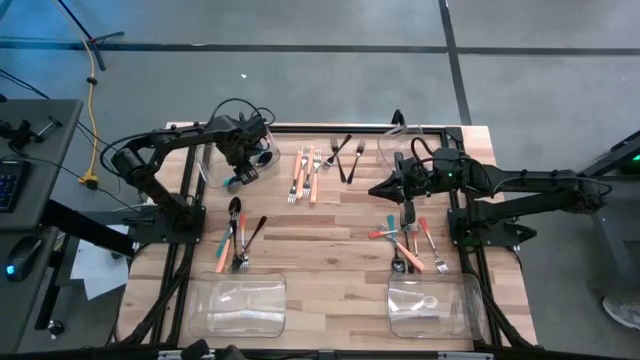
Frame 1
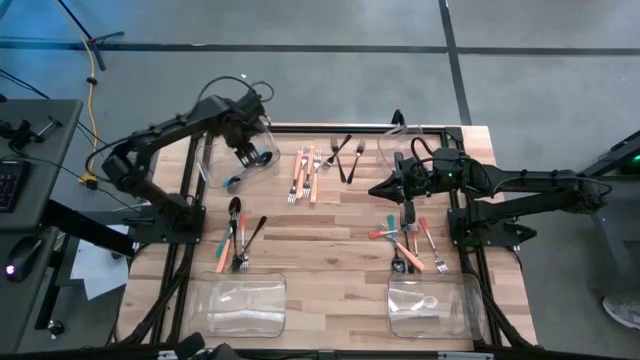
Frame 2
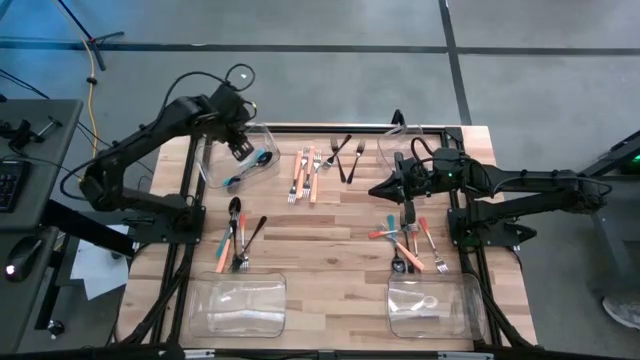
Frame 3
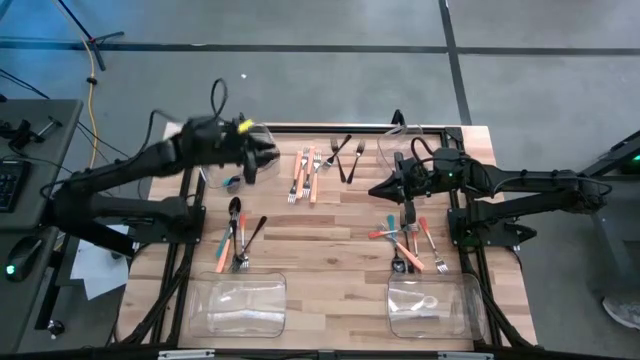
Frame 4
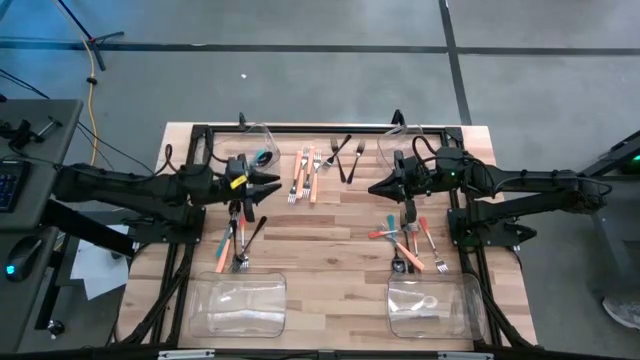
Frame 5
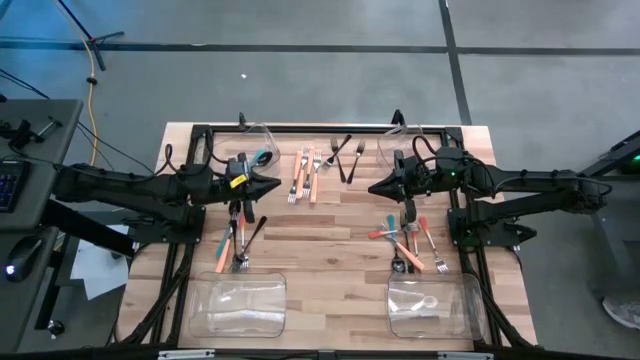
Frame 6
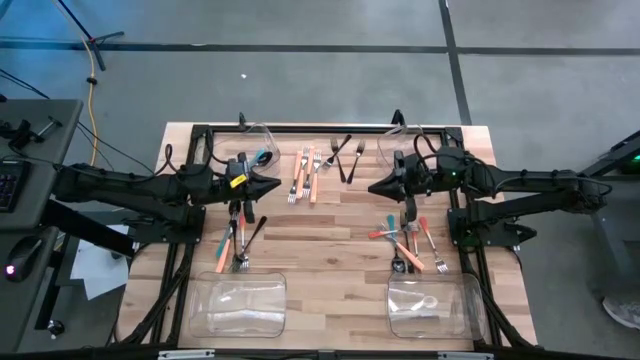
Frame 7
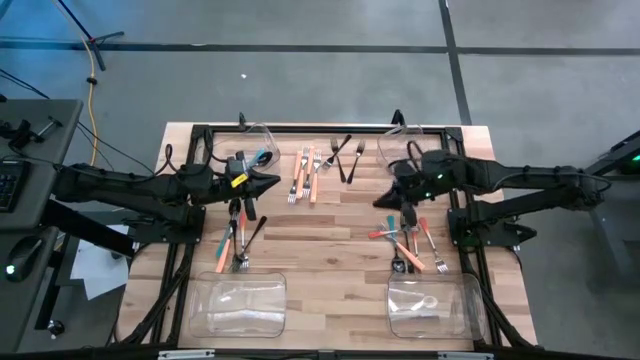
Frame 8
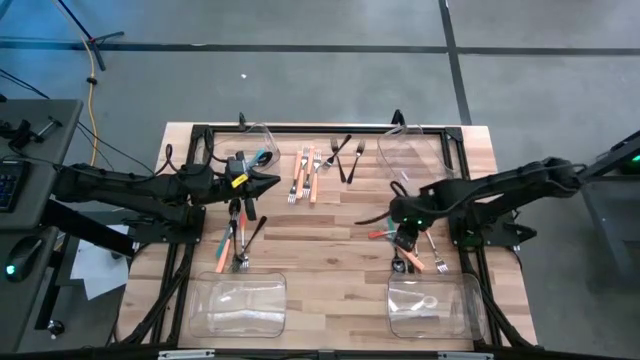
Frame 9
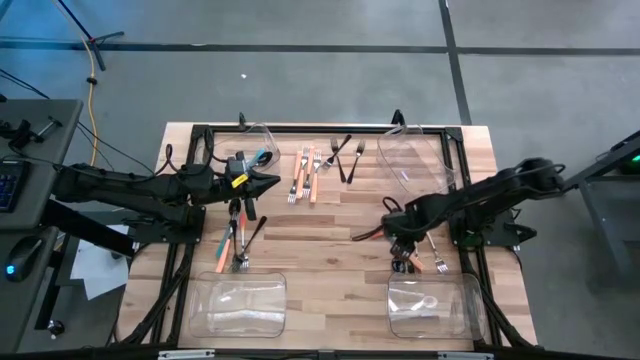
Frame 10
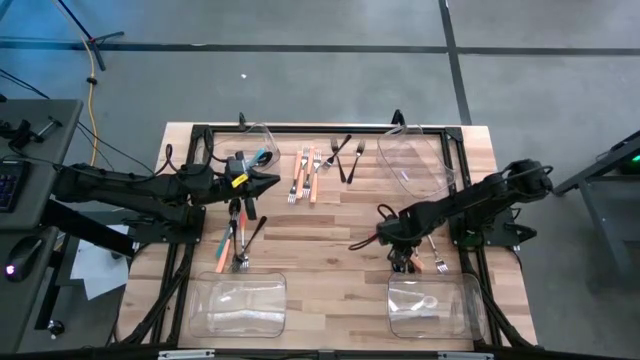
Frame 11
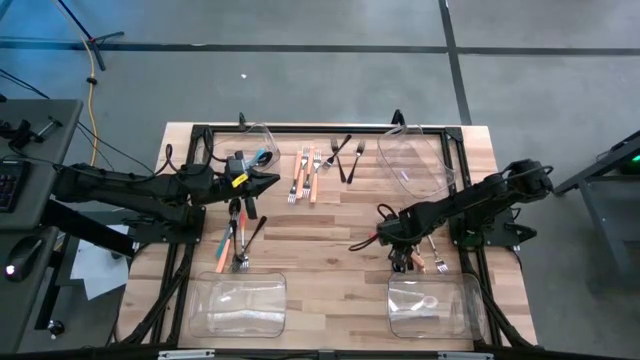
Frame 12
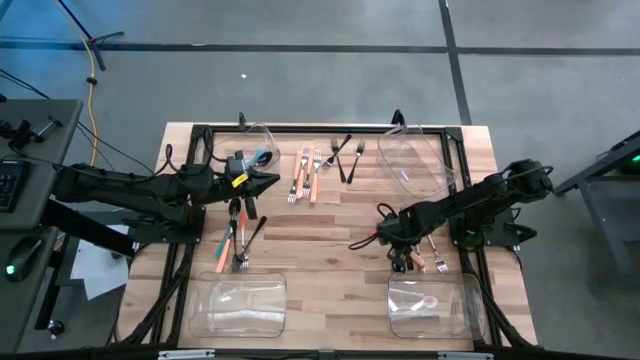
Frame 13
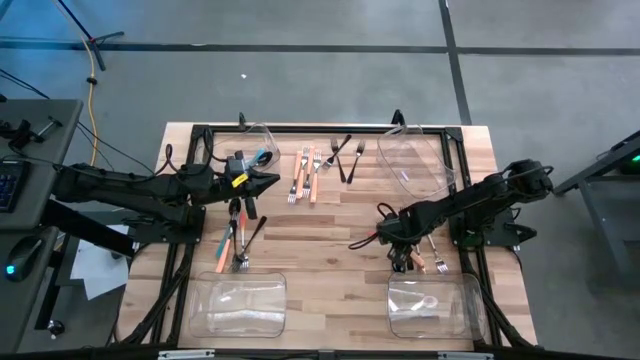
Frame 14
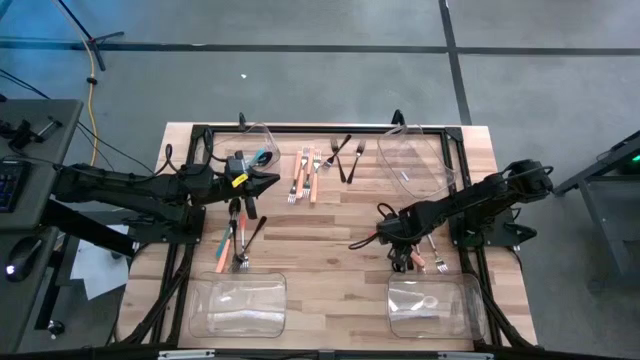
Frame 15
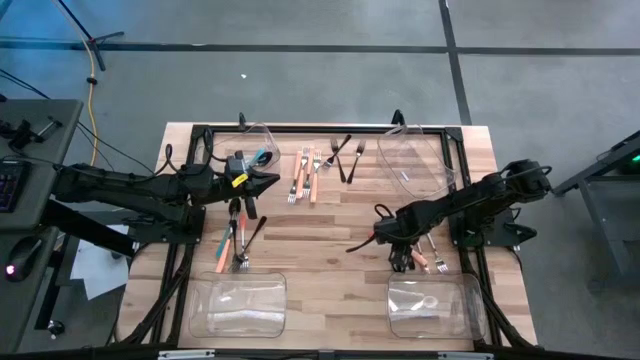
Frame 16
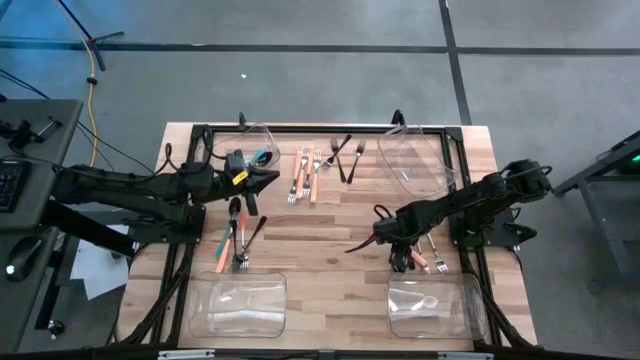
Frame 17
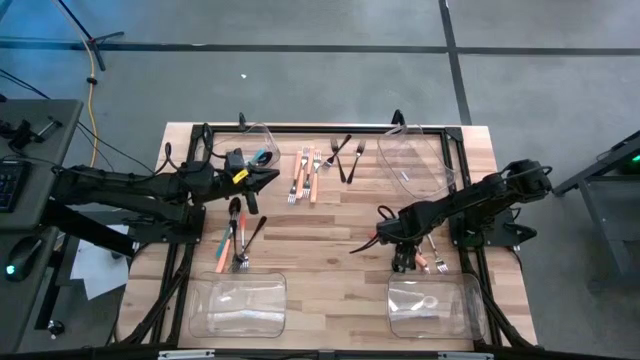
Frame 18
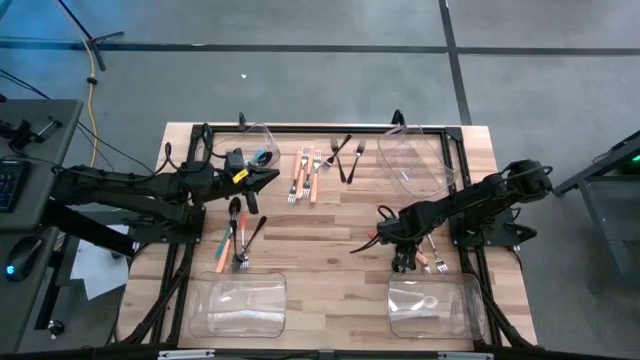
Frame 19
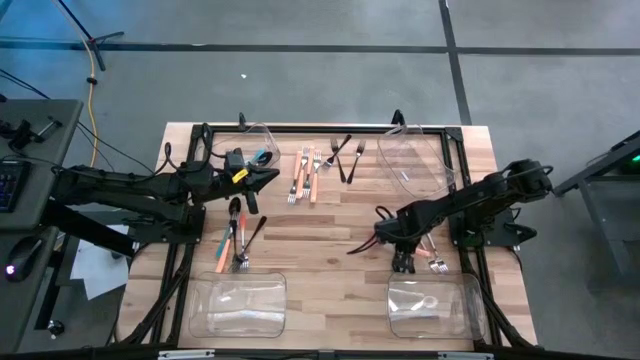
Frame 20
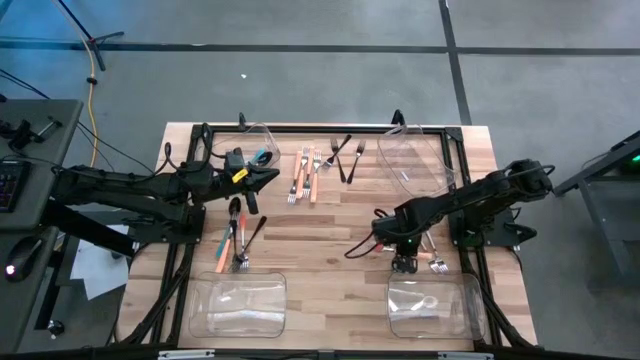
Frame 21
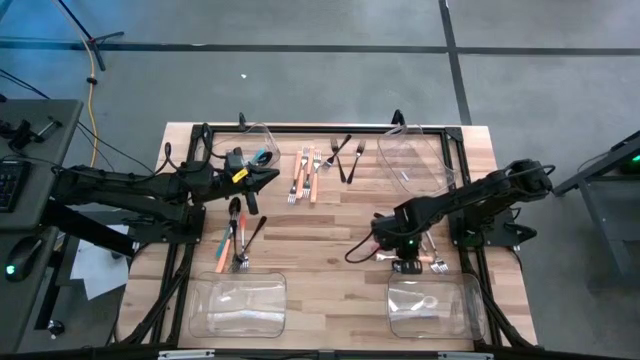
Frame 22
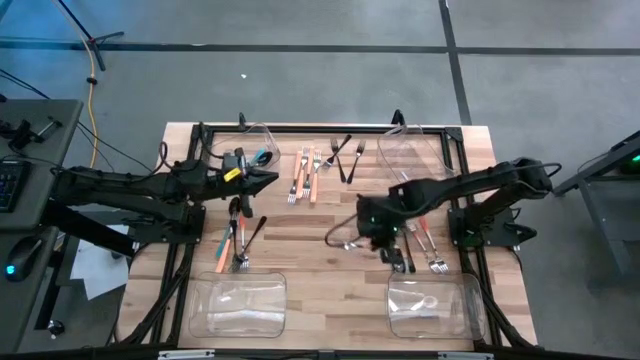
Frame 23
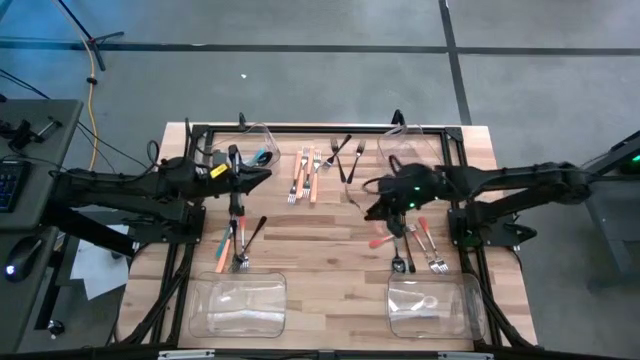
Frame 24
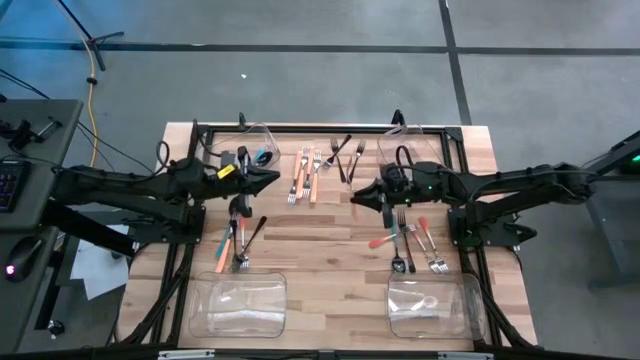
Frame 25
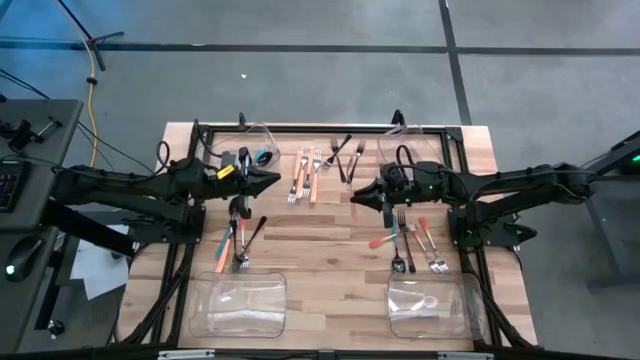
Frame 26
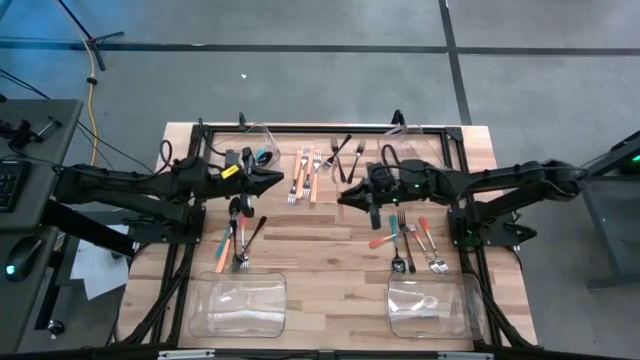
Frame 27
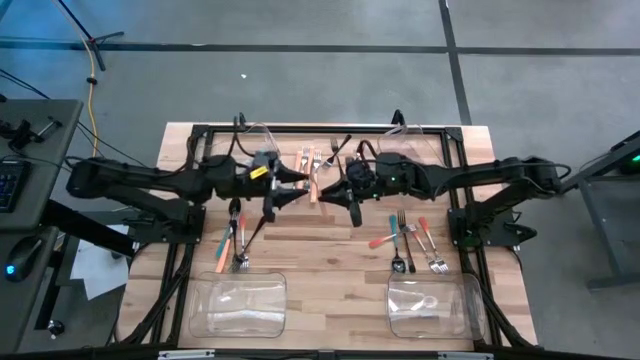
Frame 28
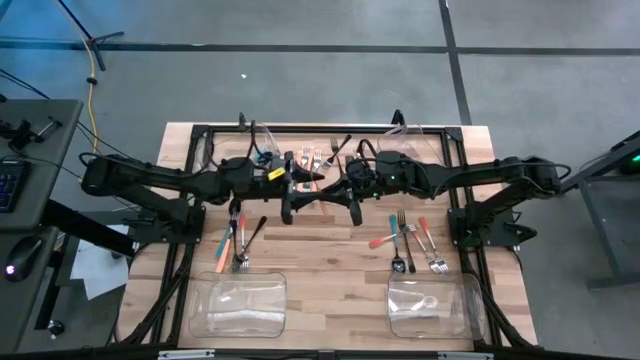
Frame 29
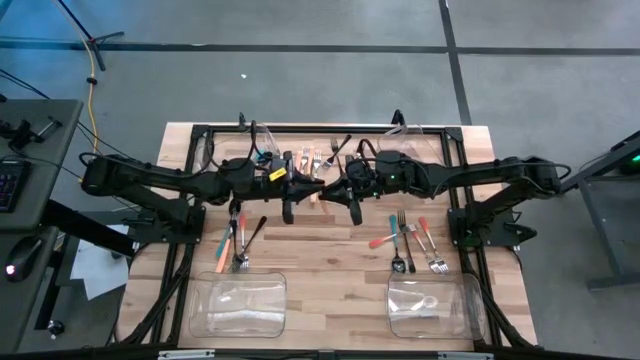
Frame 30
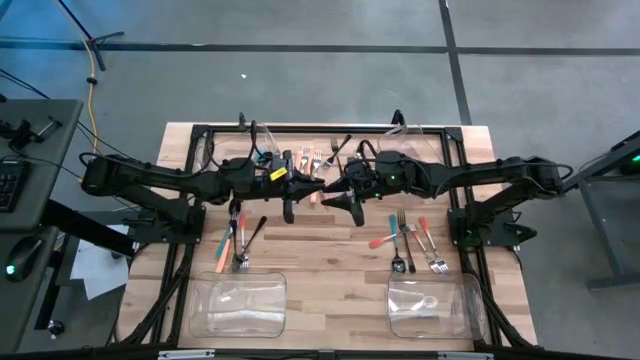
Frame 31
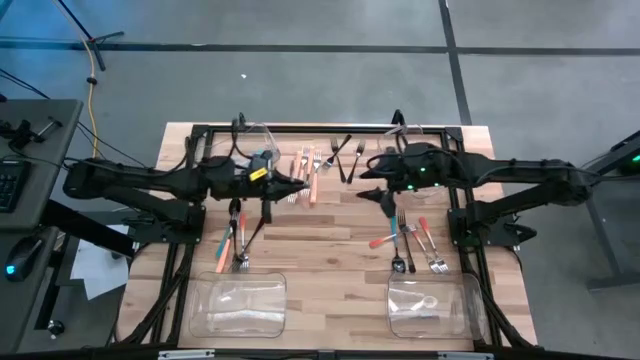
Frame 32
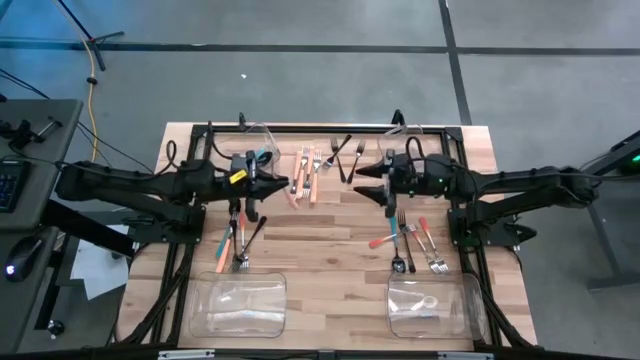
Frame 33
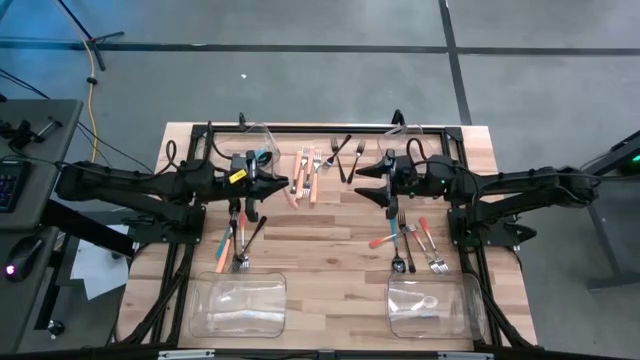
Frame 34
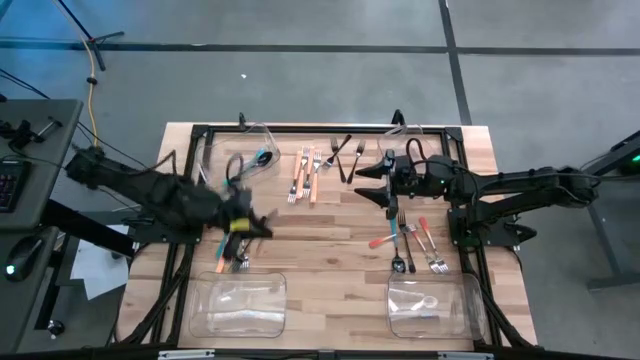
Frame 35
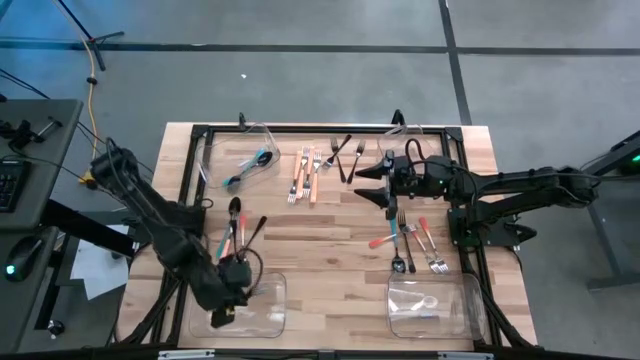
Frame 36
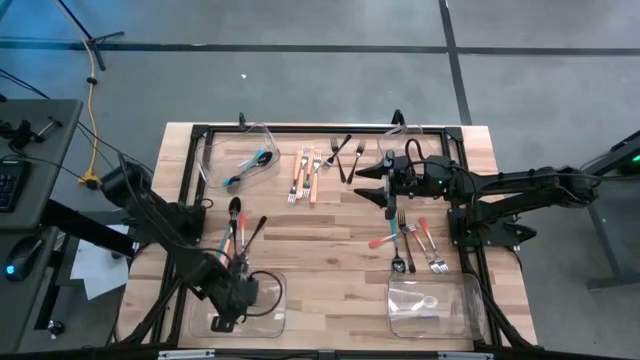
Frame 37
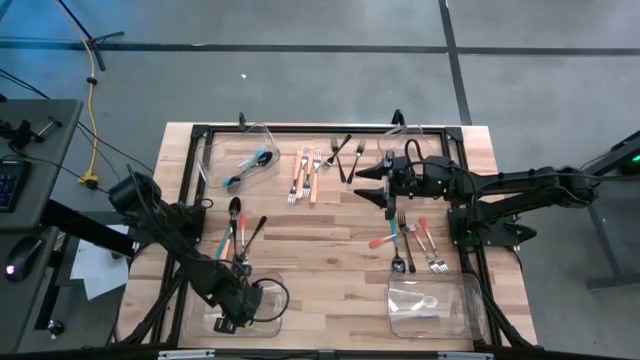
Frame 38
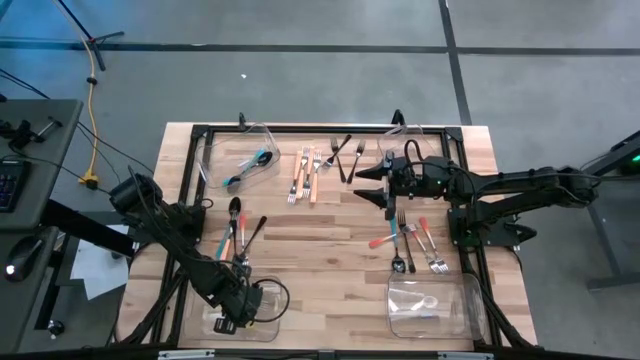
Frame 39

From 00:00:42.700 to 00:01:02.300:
Task: Sort silverware by color (type)
Put the light orange fork into the bottom left transparent bin

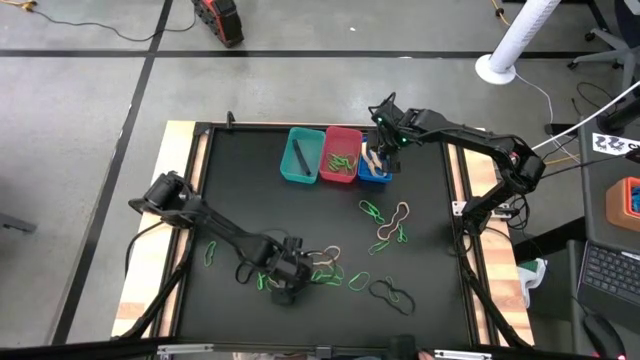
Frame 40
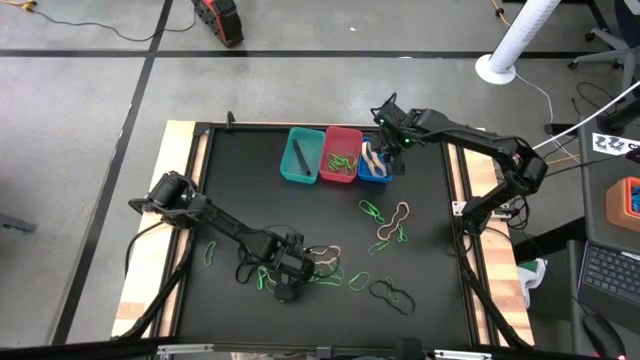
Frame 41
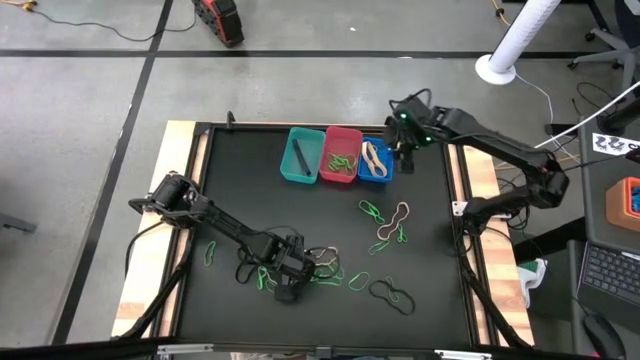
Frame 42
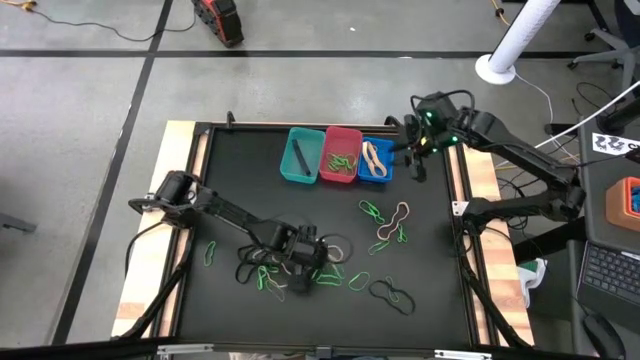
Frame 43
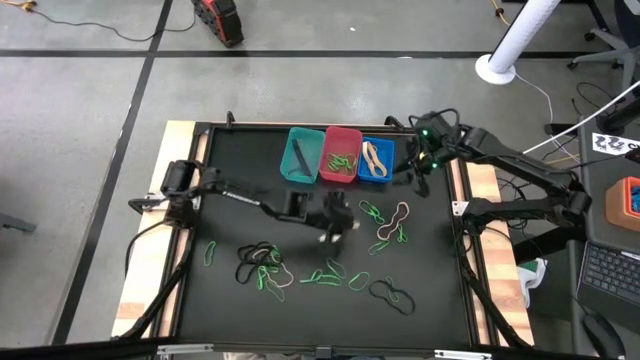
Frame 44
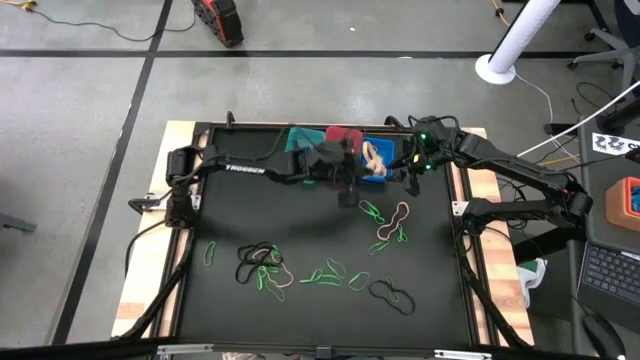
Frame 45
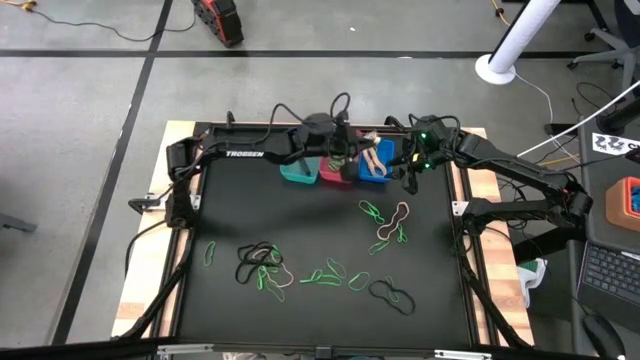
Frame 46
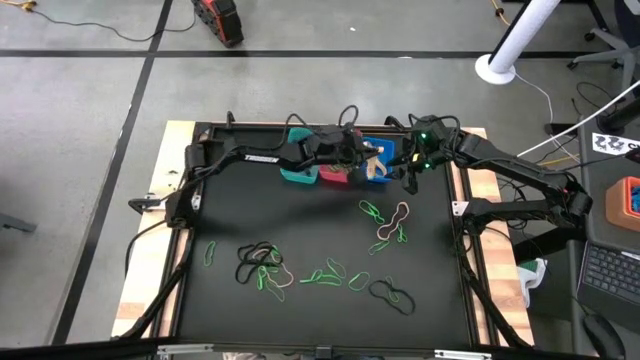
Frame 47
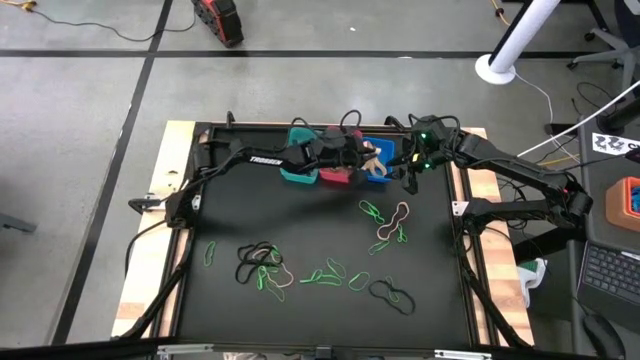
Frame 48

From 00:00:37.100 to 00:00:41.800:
Task: Sort rubber bands into baskets
Put the brown rubber band into the blue bin
